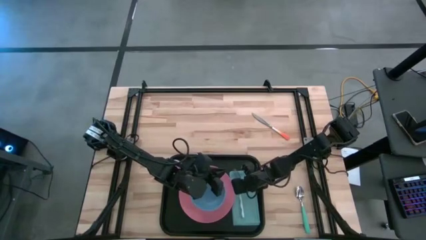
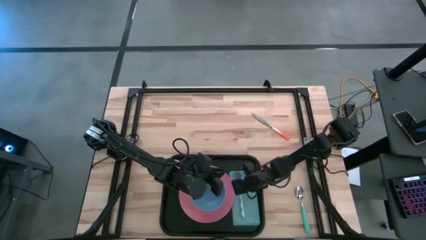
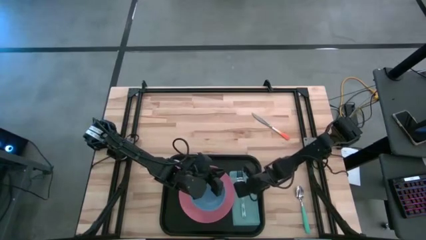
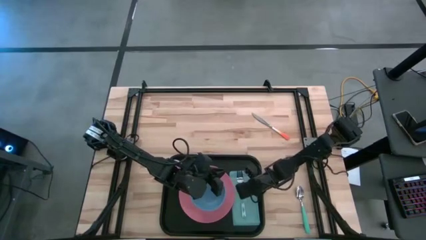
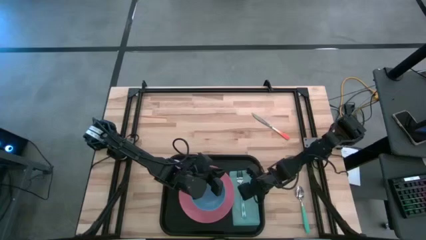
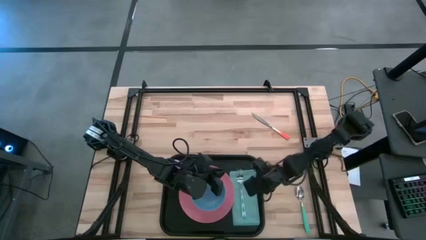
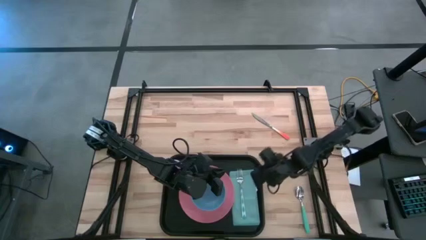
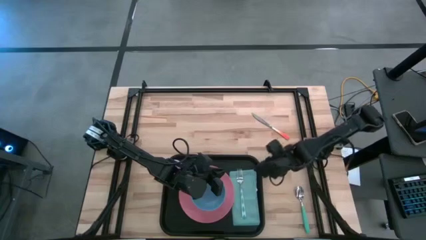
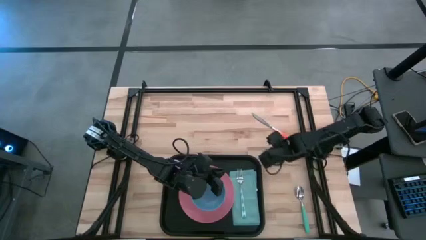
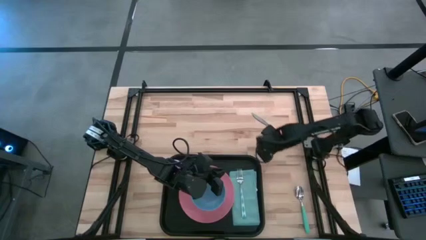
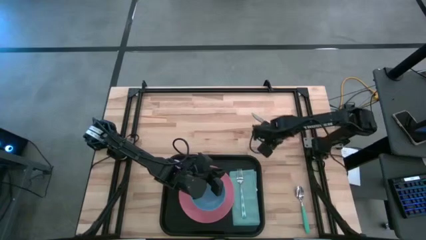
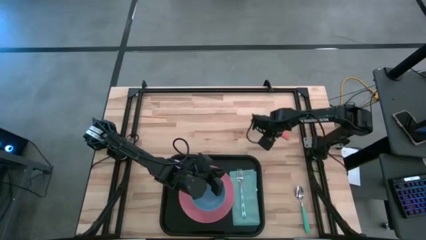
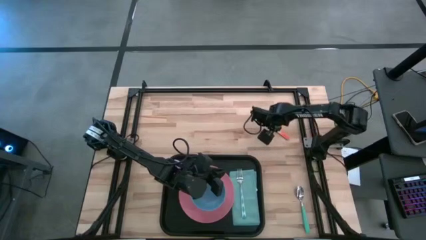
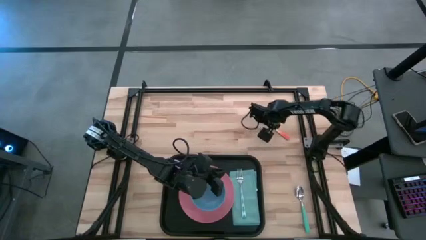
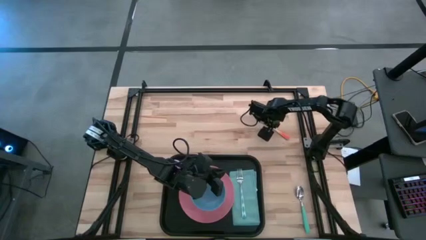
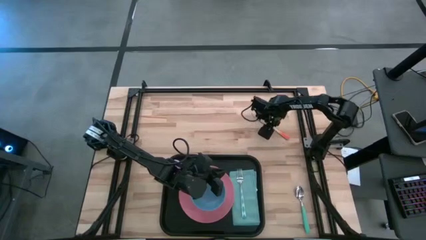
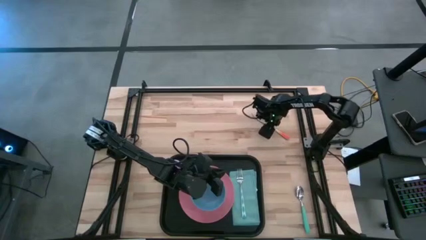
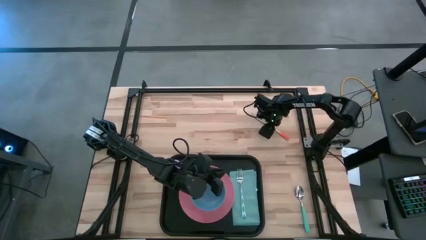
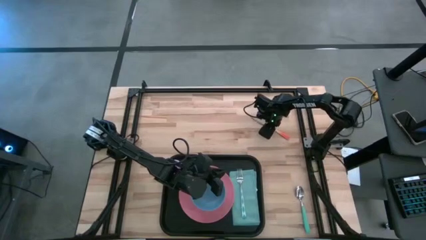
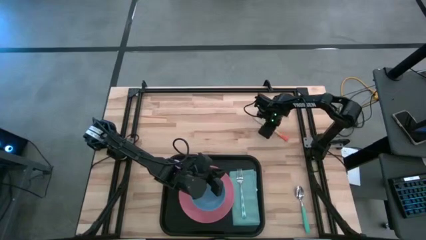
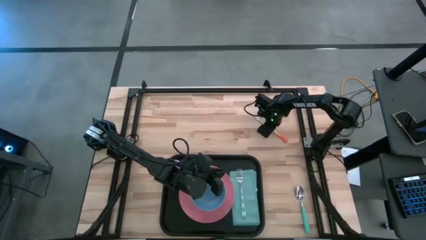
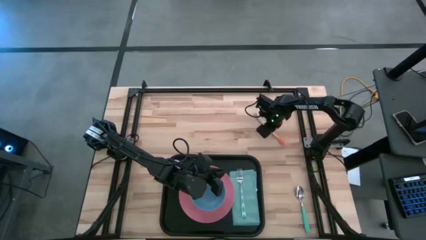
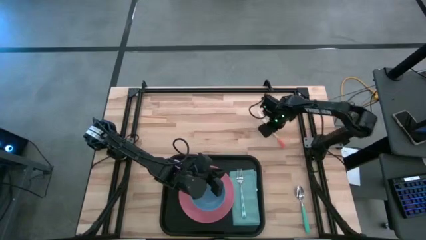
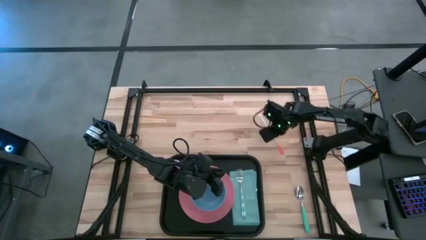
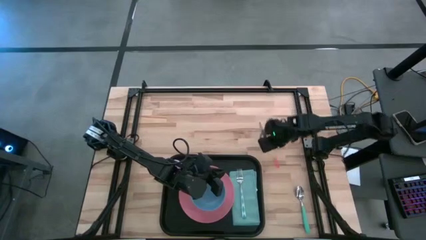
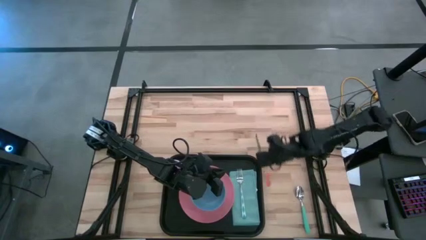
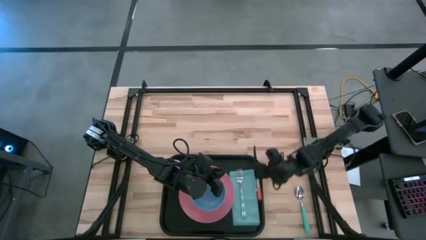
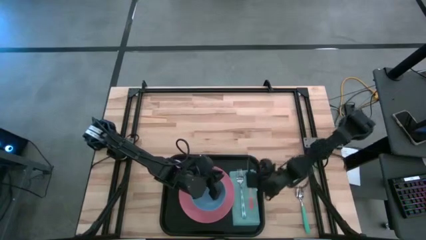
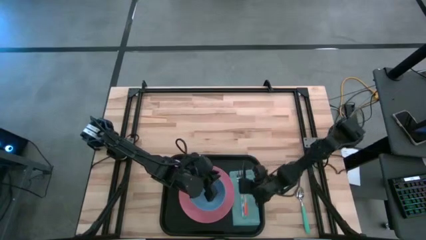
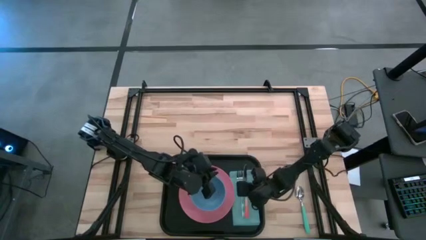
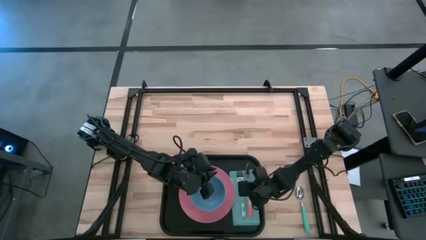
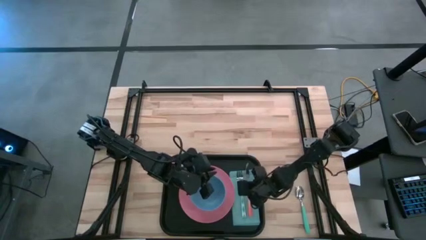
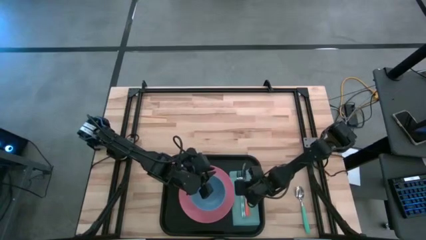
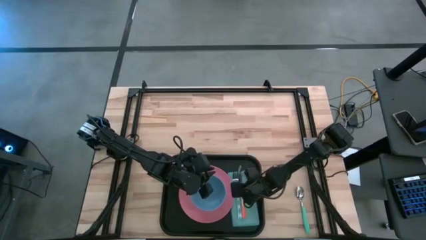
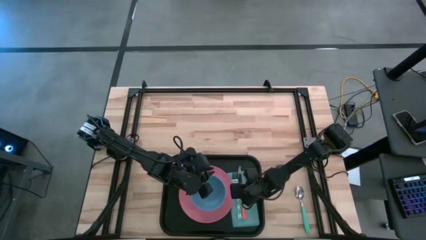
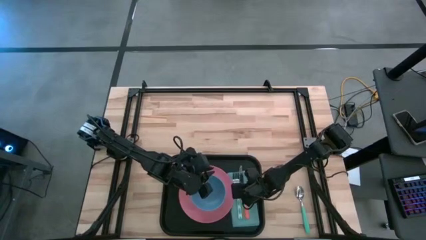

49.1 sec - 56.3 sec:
Task: Set up tray
Put the knife on top of the napkin

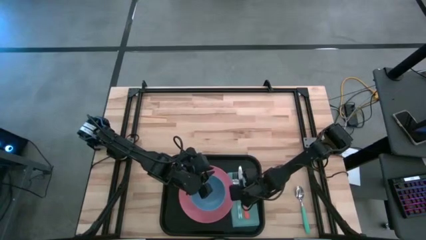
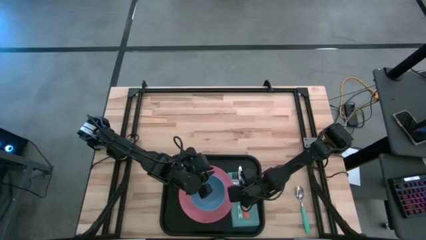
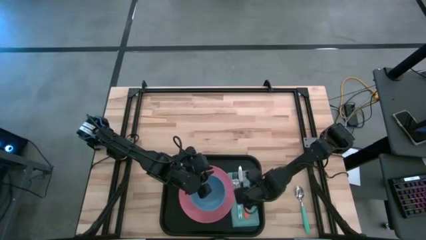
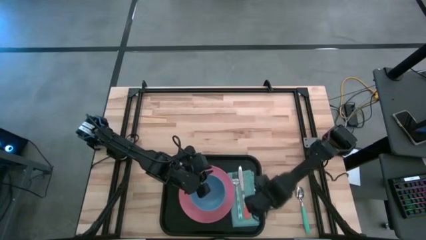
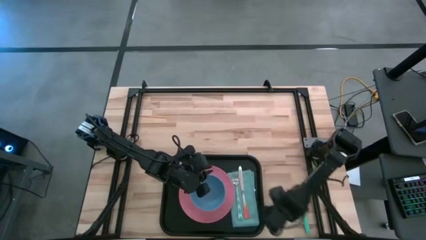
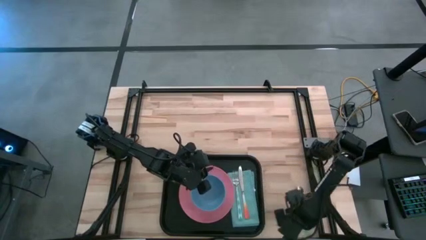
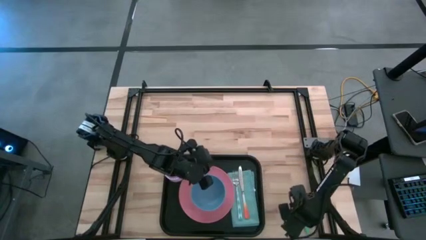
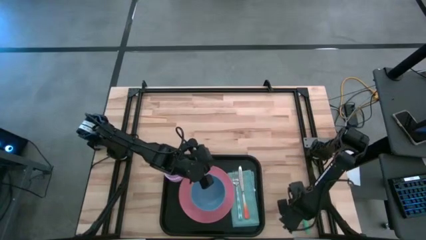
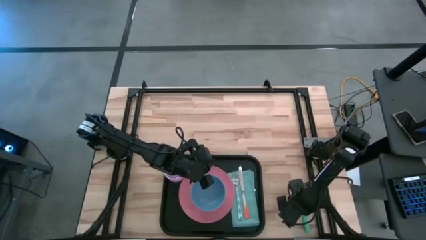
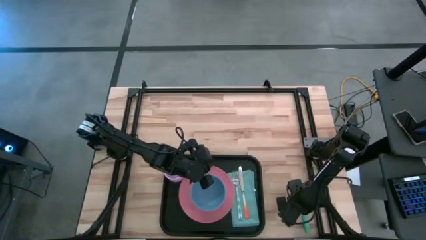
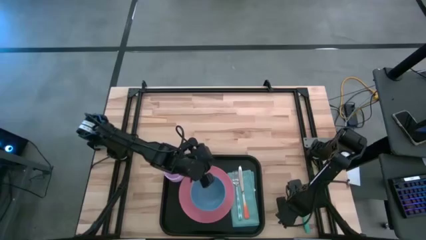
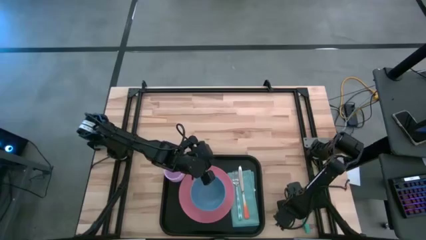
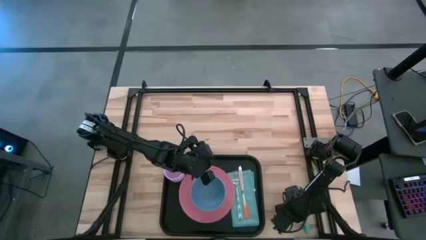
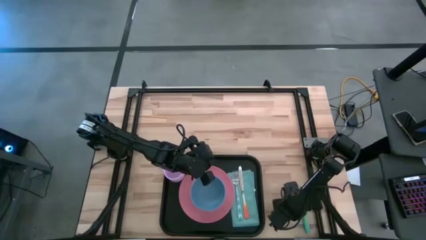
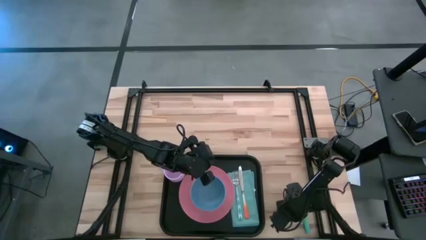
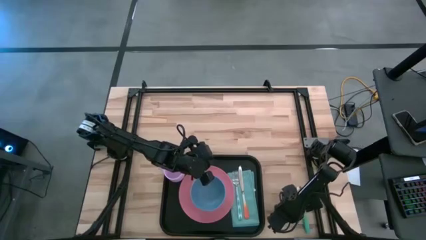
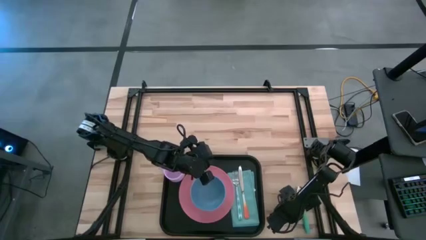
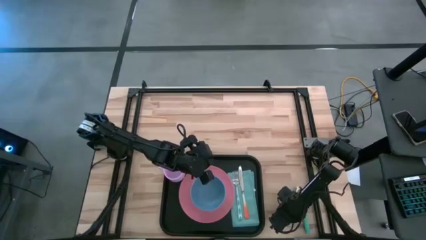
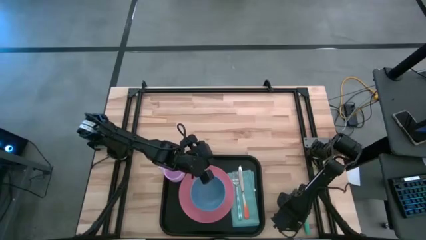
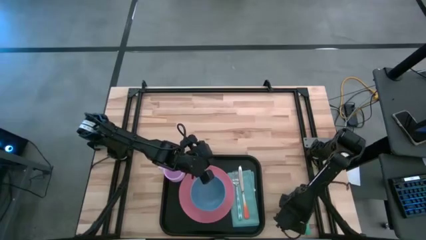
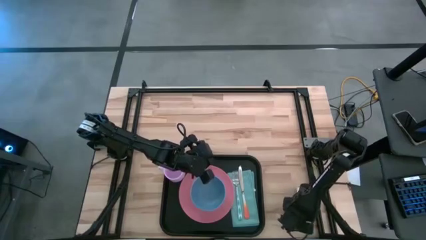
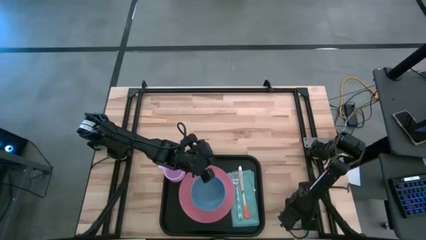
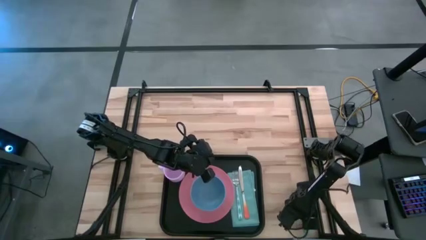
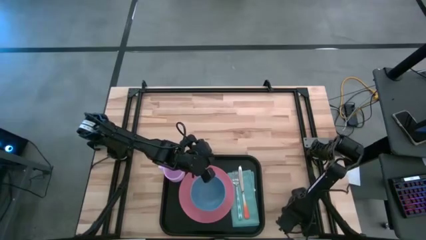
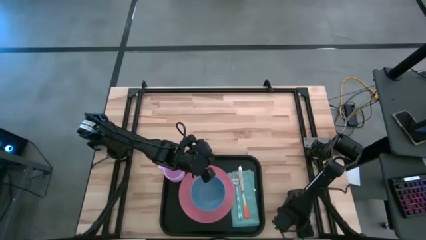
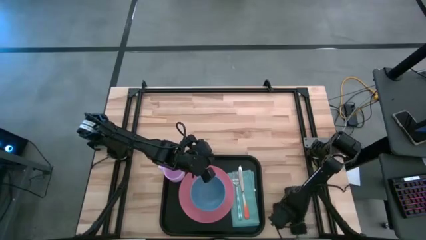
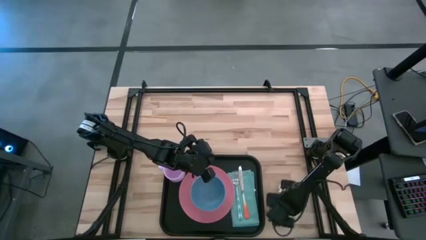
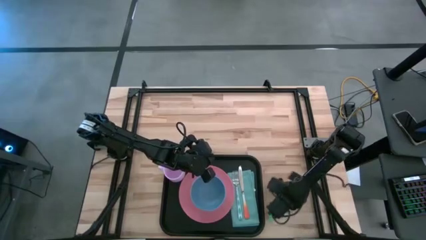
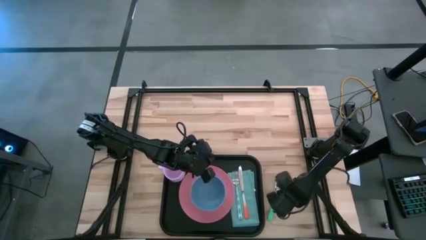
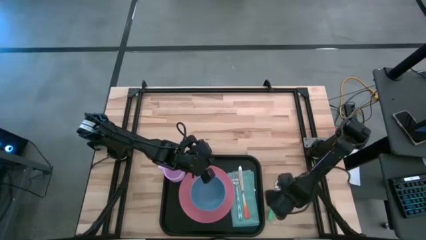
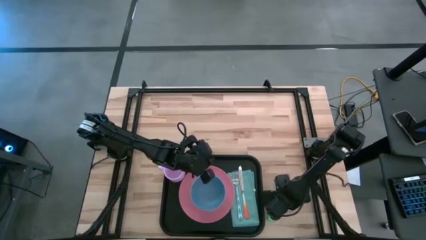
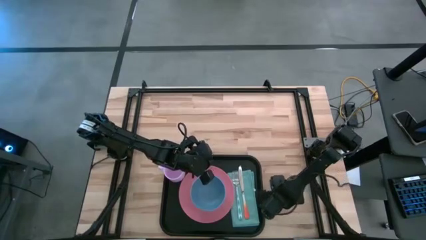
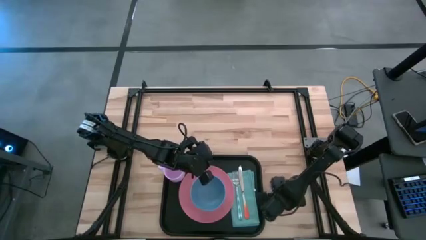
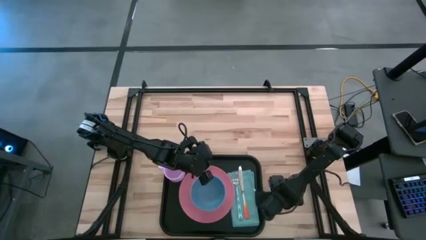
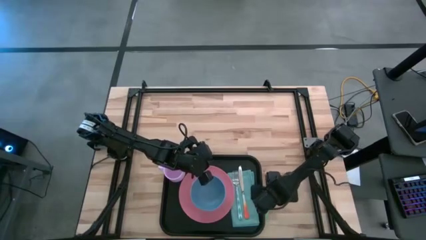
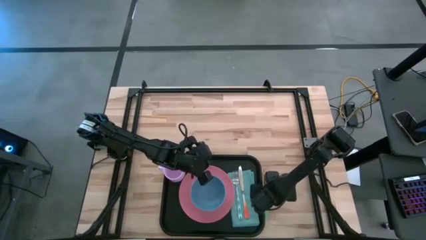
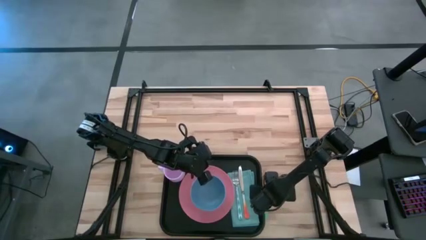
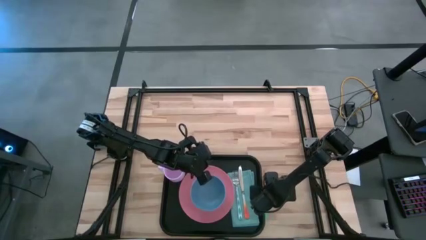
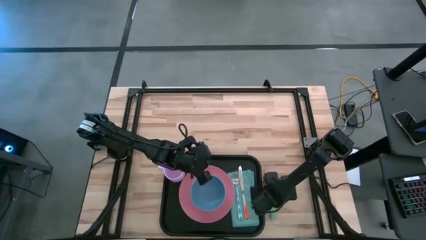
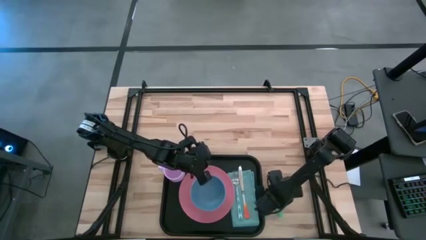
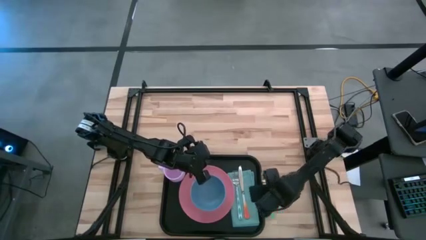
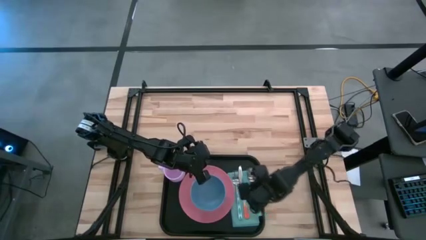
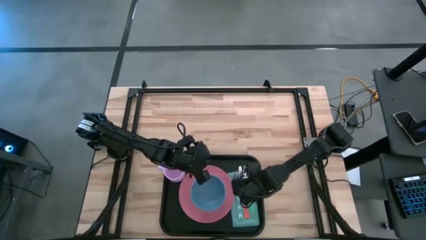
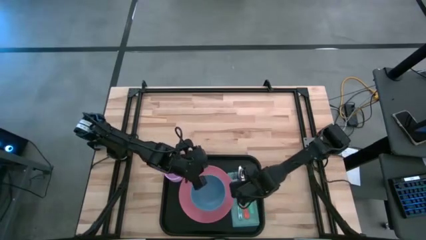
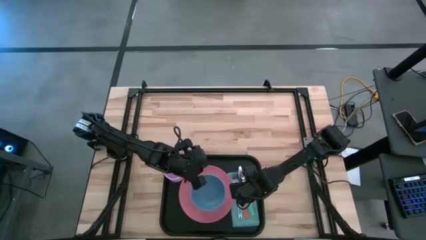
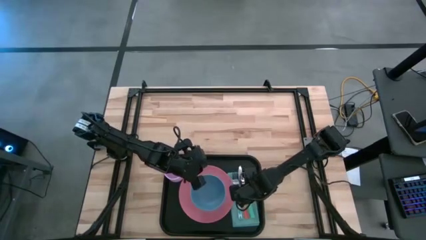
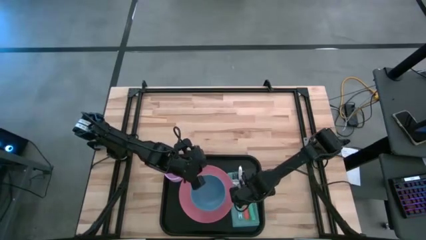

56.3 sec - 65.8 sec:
Put the spoon on top of the napkin

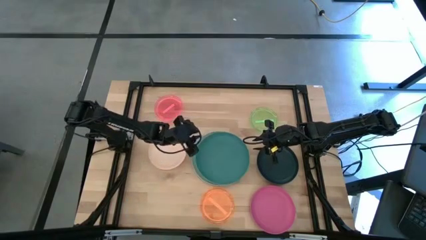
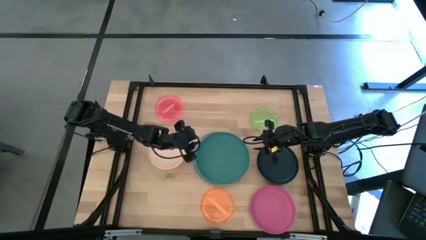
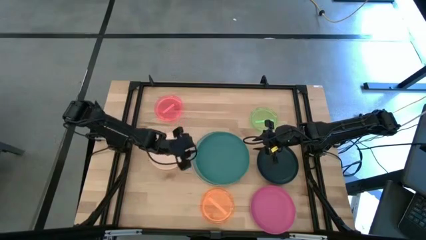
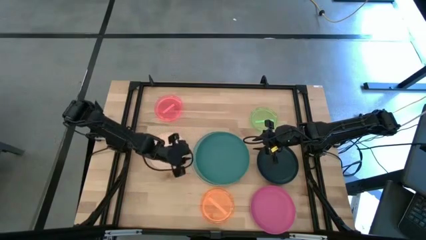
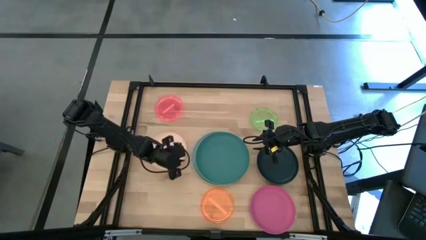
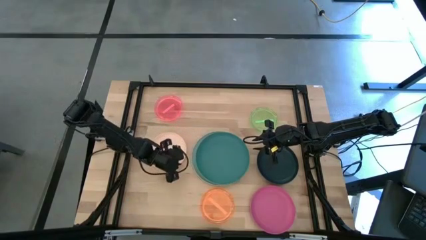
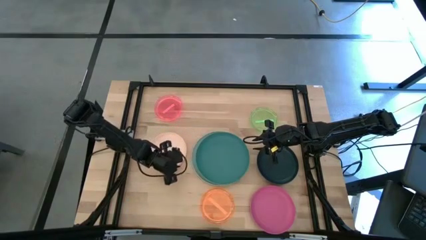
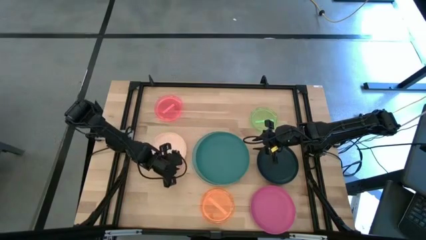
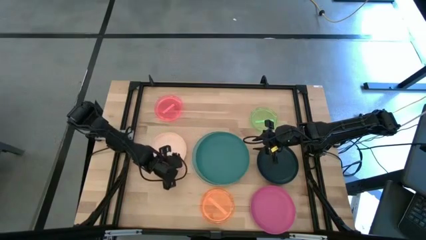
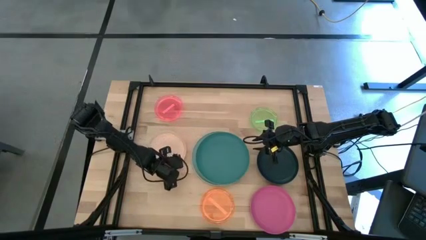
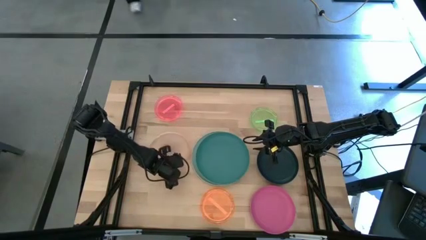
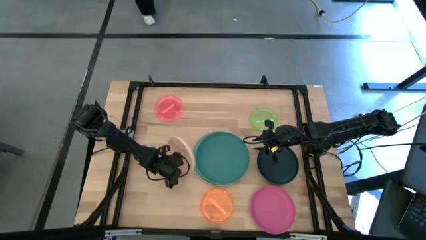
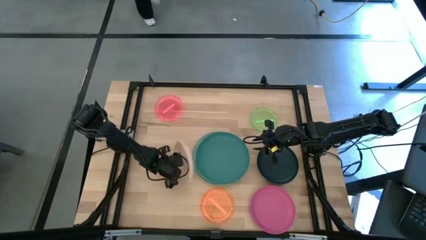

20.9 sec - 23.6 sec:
Task: Stack plastic plates
Stack the white plate on top of the dark green plate
